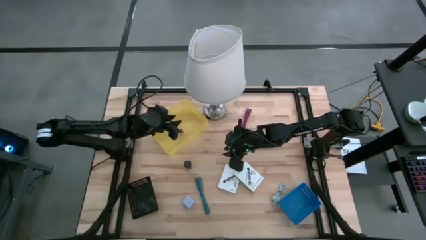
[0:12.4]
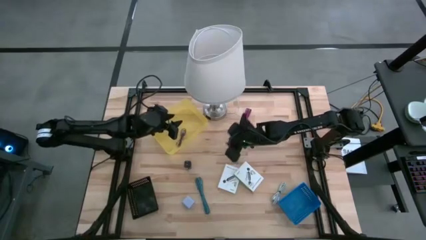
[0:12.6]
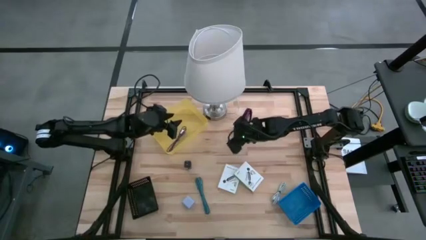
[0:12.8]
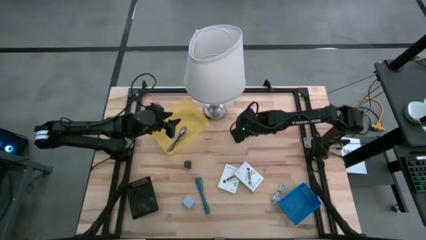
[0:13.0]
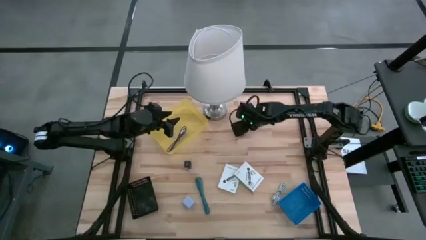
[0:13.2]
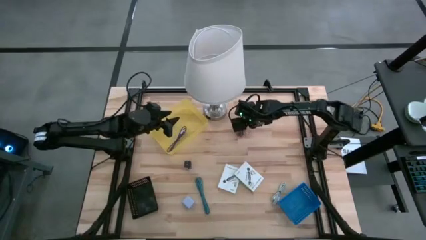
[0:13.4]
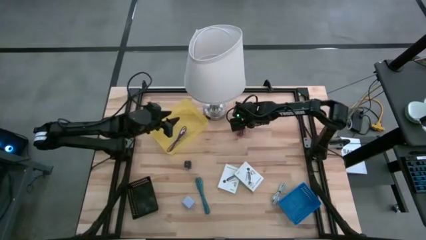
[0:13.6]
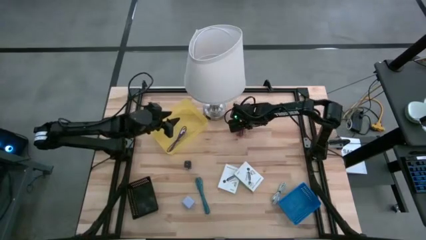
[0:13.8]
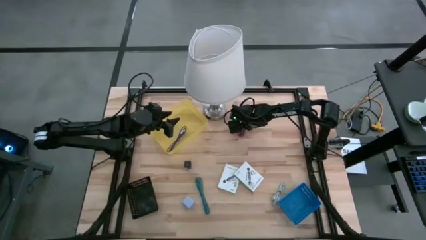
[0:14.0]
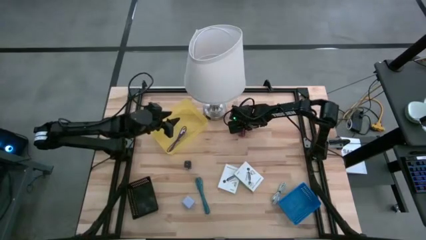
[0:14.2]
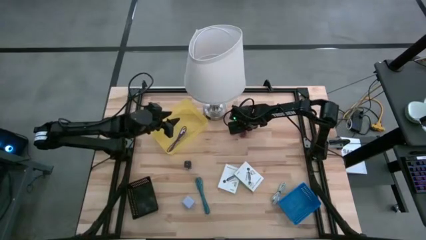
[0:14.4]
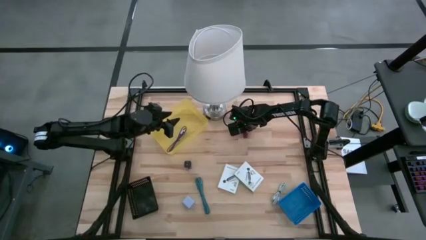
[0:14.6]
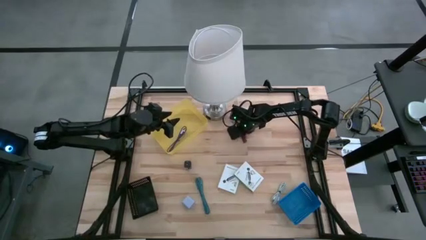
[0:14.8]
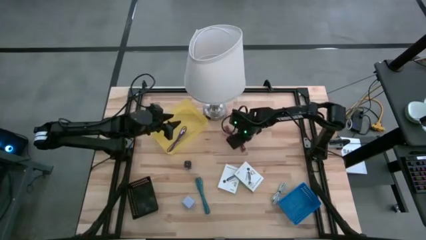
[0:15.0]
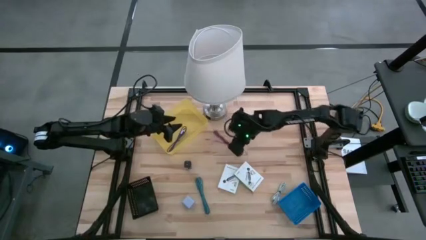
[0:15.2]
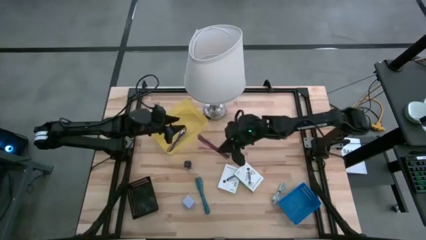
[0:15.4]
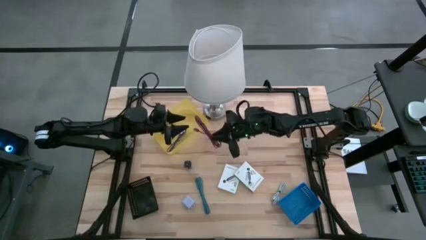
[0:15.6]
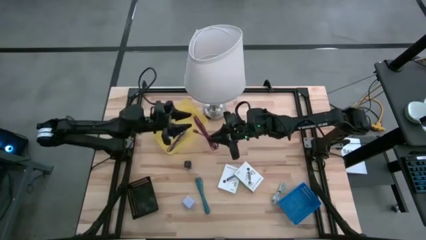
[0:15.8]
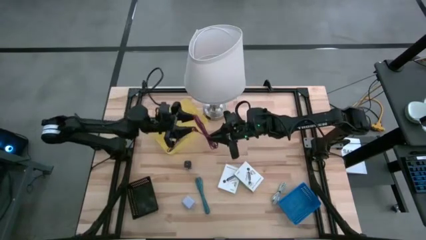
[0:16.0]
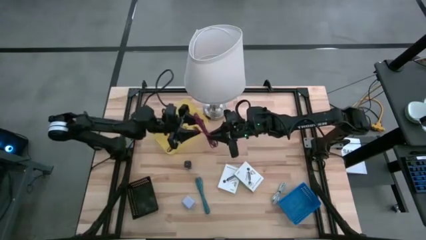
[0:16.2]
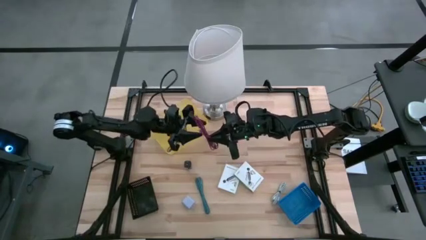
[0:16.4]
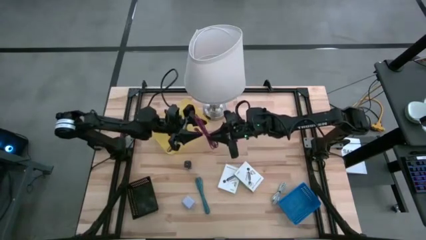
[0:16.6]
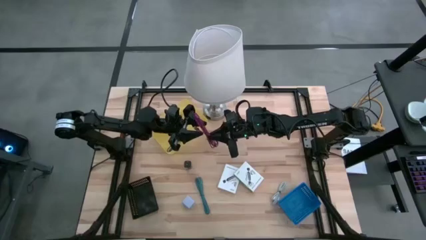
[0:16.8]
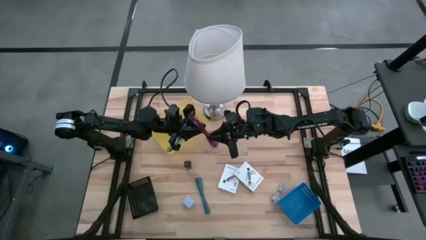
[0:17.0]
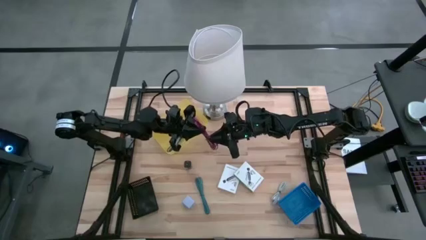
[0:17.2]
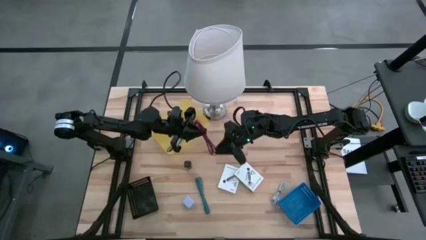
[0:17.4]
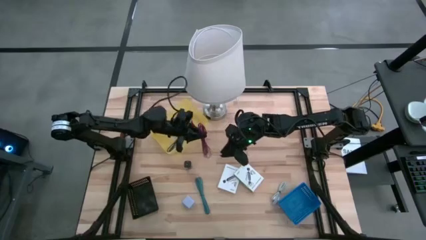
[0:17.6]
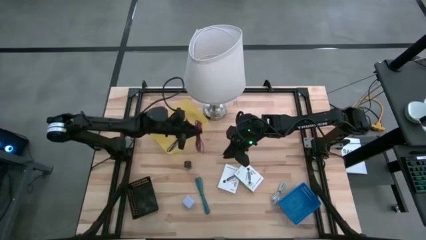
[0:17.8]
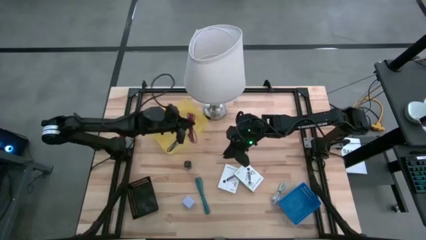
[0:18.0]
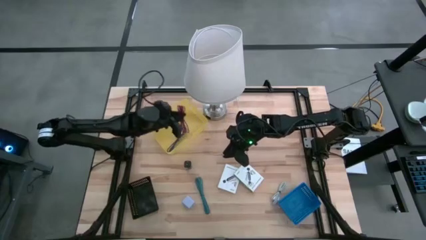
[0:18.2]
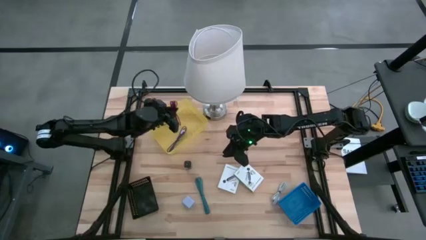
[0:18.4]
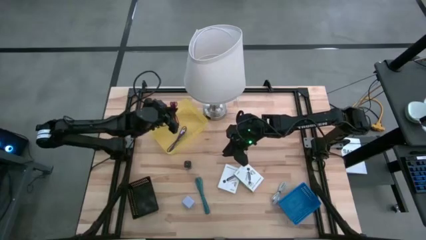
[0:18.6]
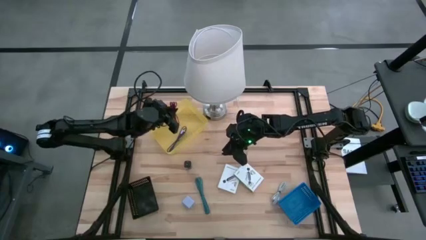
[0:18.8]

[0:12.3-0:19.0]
Task: Pick and place items into bin
Put the pink USB cable into the yellow bin

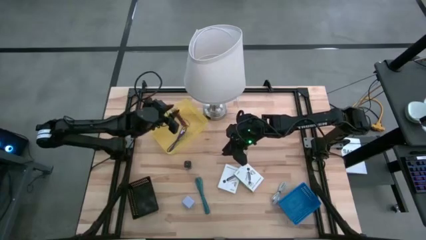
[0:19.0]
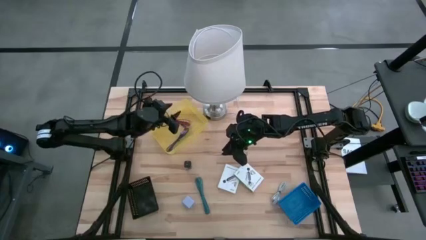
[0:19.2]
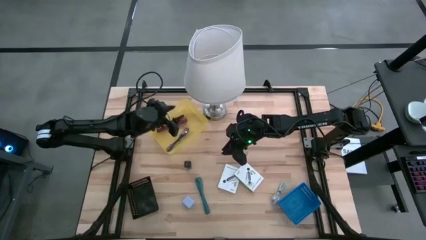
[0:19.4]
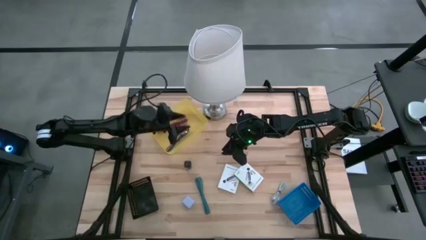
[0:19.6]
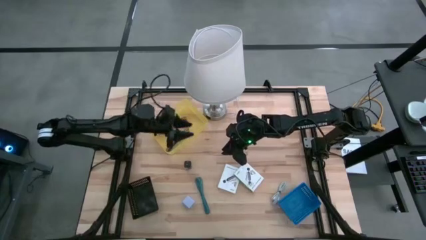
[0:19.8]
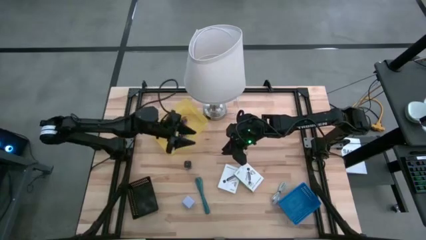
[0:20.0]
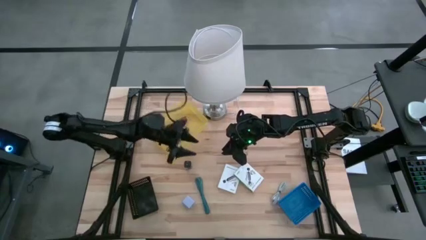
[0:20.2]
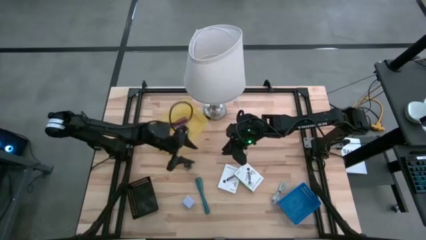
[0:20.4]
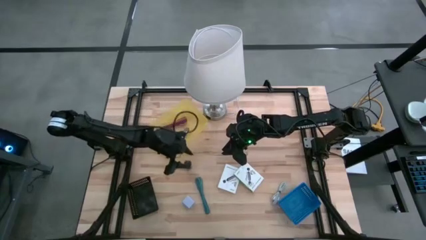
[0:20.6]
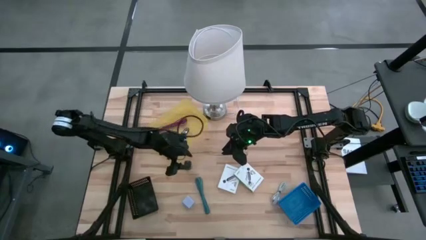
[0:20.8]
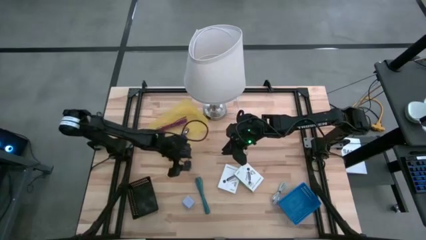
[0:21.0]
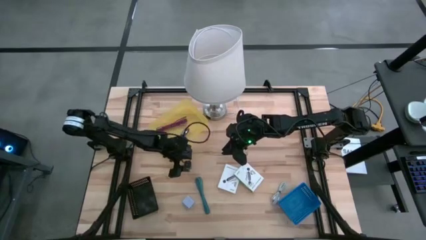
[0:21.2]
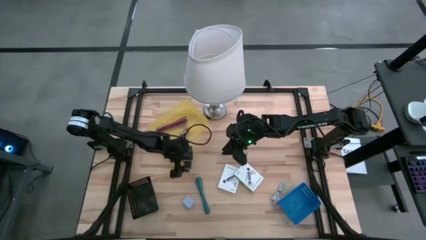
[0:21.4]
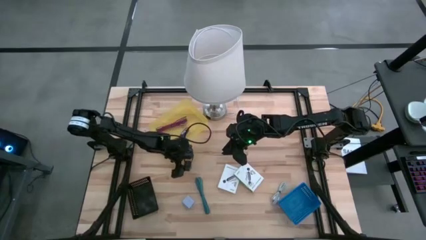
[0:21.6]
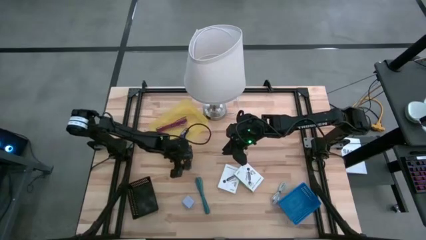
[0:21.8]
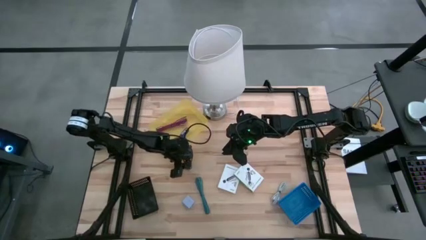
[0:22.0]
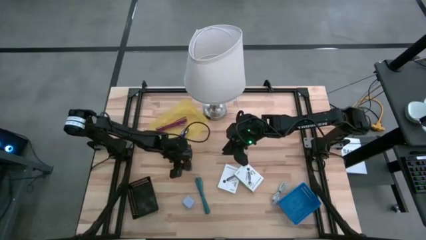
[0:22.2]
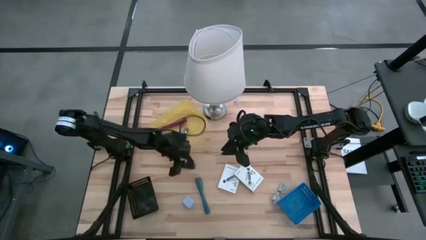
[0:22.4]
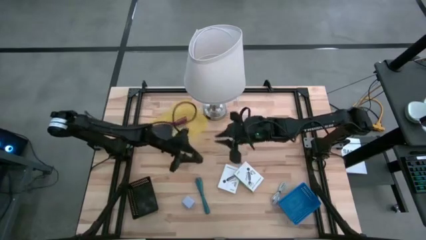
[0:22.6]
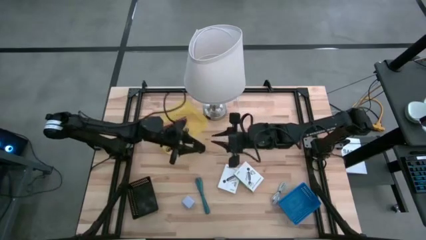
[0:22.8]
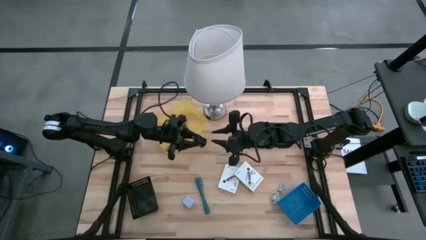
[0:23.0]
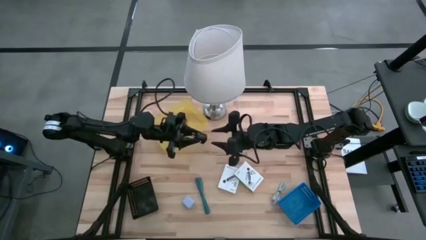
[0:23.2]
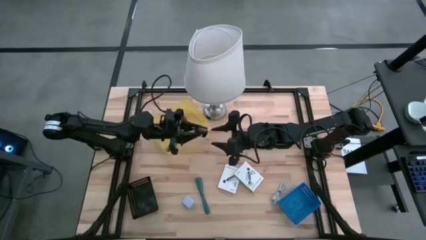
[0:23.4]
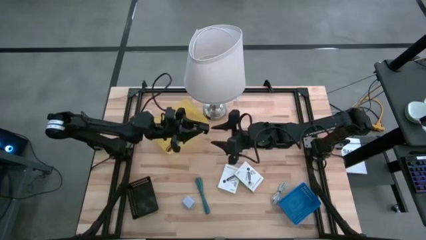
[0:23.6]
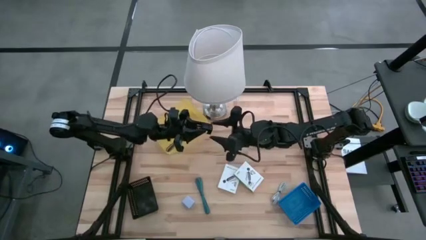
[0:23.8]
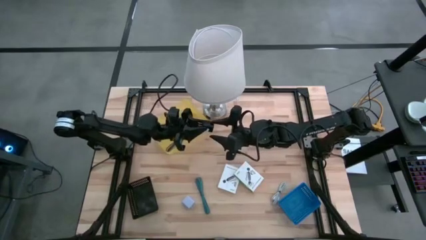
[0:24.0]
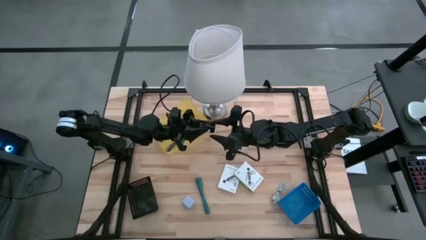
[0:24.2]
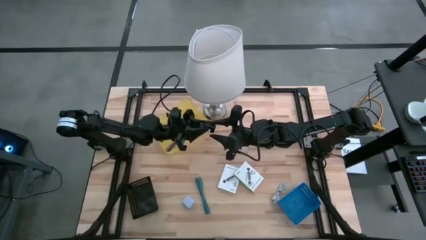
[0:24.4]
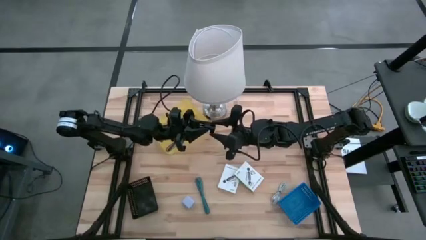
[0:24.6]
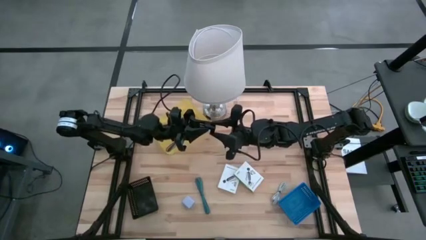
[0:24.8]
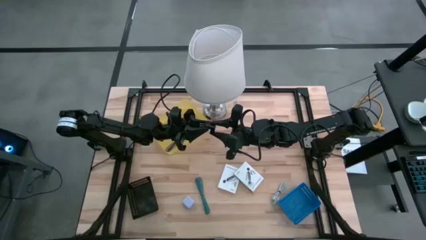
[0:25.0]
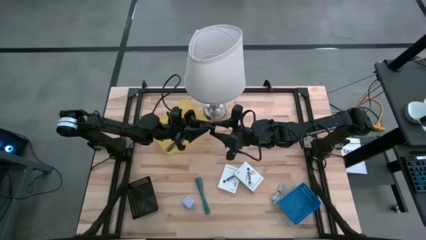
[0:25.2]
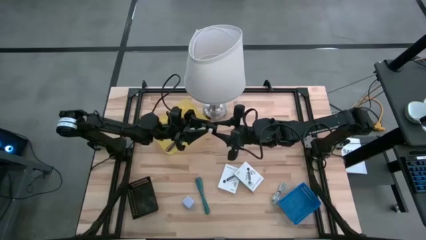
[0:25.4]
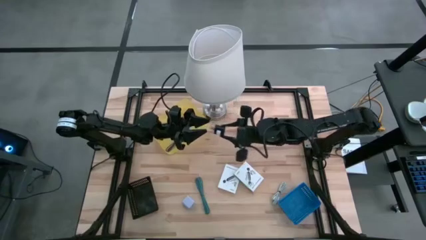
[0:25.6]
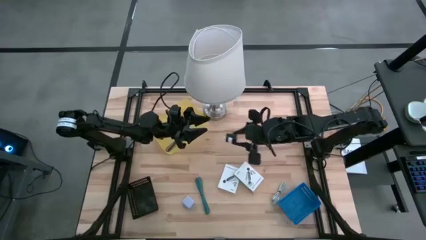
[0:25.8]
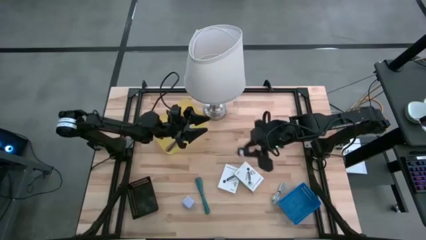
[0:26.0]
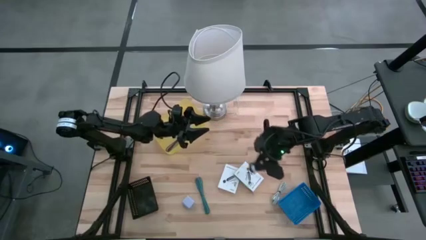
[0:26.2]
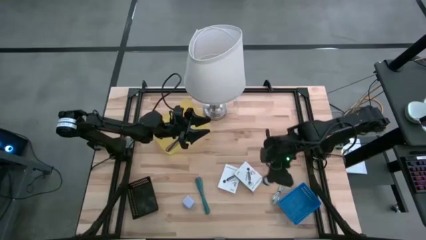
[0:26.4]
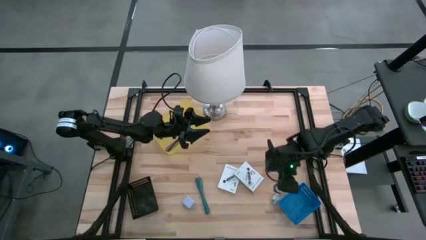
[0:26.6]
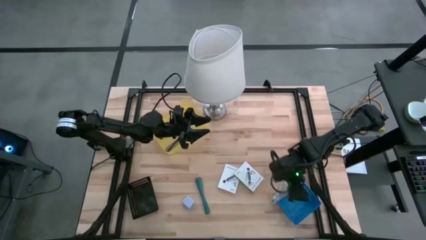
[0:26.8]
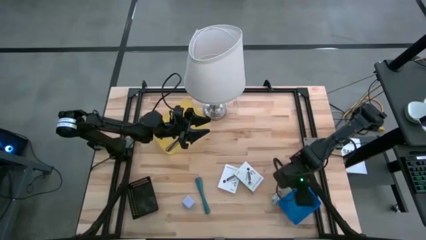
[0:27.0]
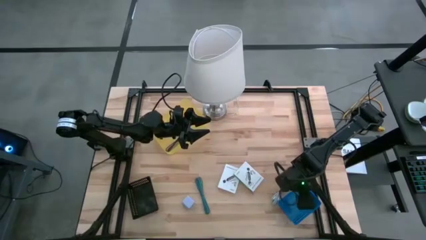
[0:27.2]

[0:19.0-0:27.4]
Put the black charger adapter into the black bin

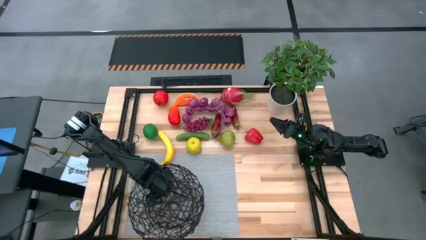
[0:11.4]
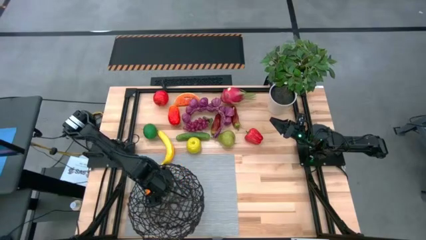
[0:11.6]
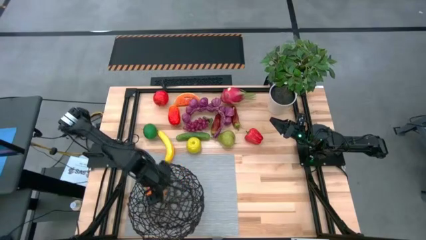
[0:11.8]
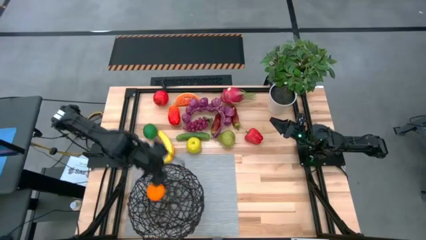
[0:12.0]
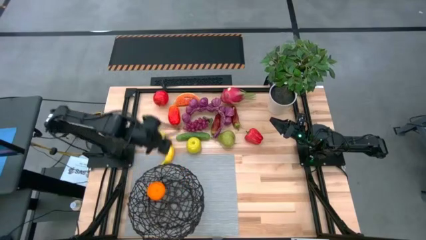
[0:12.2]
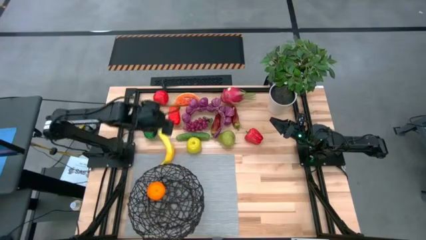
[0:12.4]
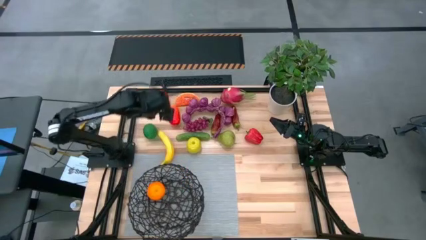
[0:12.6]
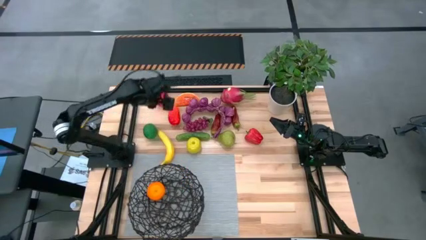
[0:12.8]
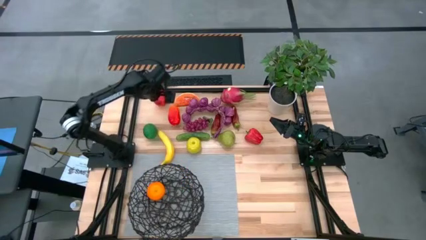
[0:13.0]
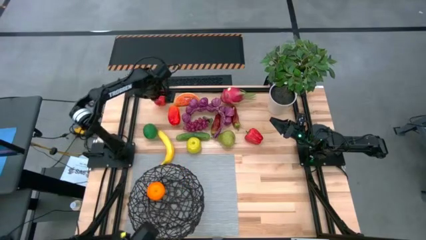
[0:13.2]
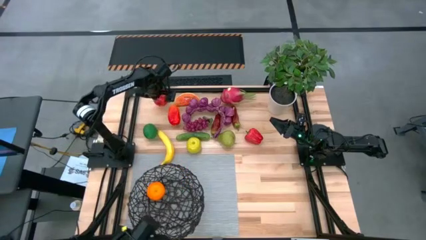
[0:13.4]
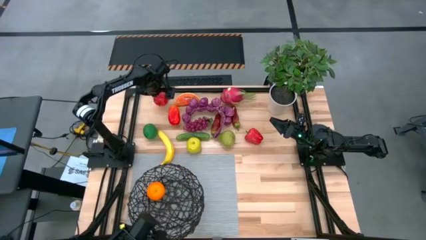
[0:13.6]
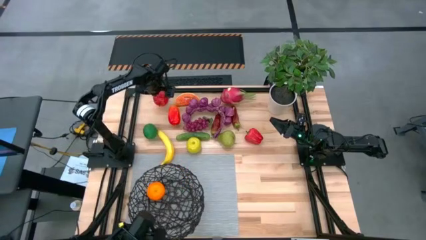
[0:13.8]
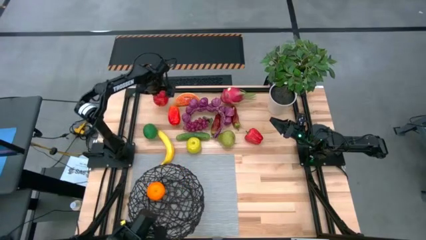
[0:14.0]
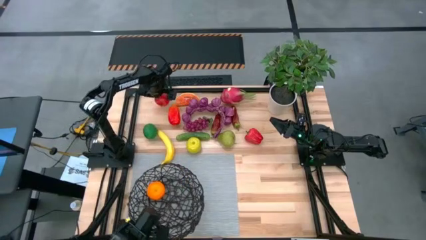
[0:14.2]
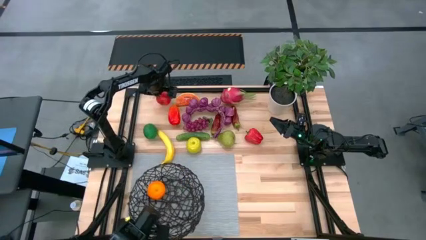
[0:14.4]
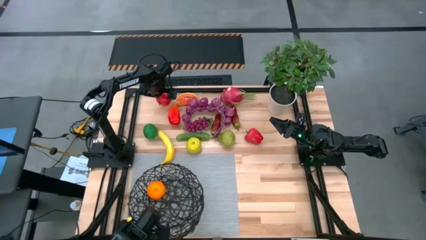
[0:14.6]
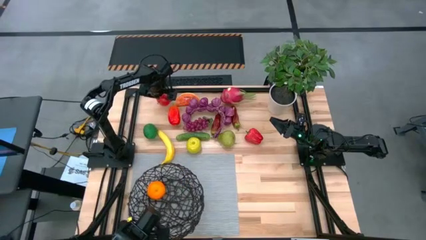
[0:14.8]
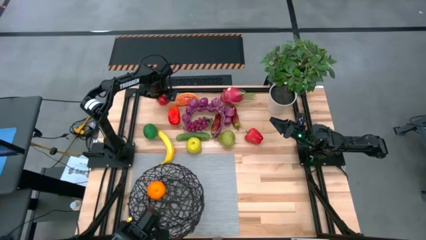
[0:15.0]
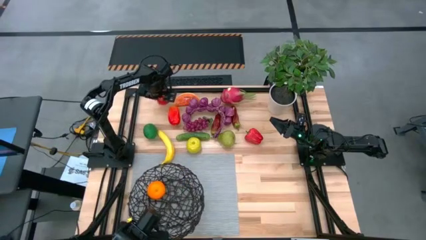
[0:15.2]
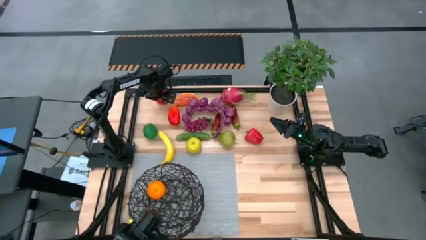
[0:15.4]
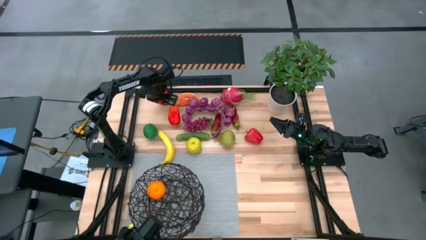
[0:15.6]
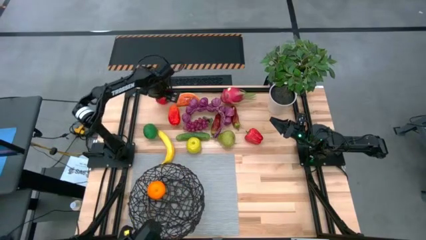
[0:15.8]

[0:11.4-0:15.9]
Task: Build produce basket
Put the red apple into the black wire basket
